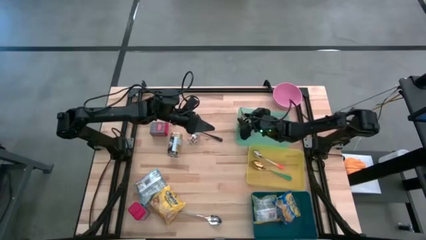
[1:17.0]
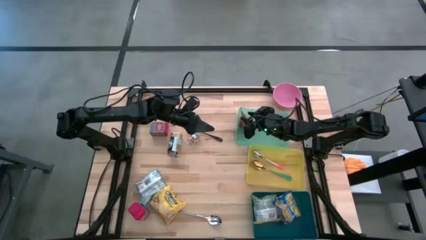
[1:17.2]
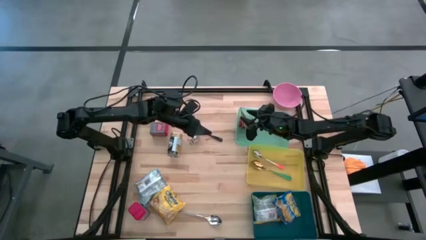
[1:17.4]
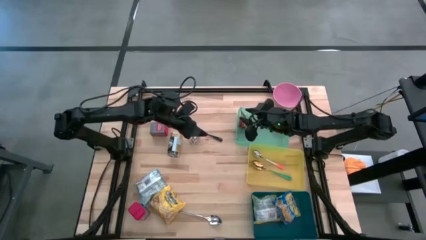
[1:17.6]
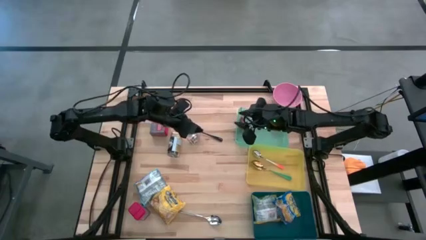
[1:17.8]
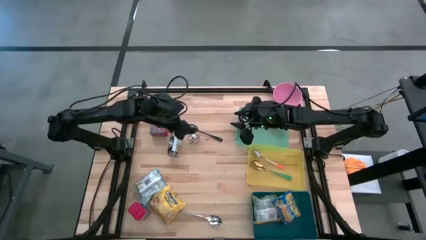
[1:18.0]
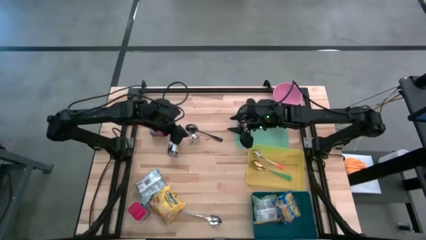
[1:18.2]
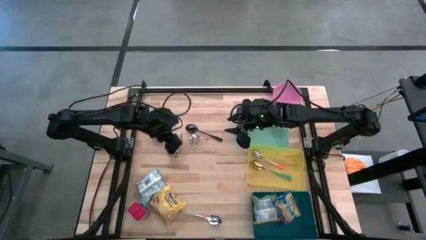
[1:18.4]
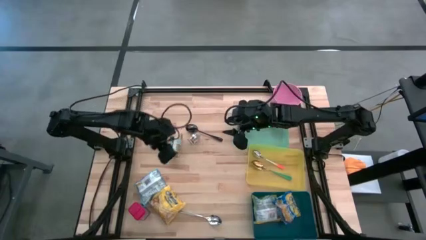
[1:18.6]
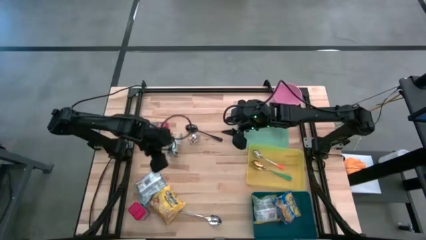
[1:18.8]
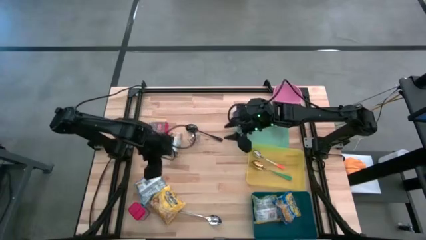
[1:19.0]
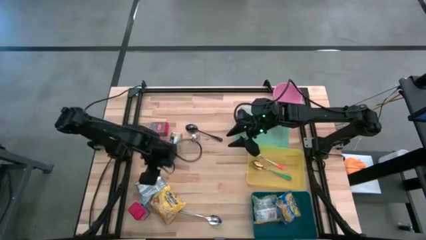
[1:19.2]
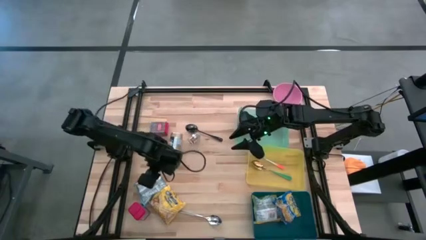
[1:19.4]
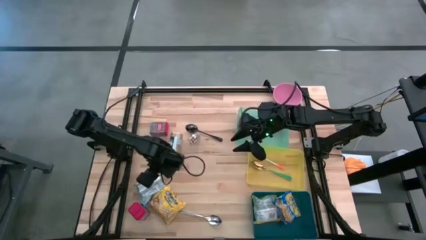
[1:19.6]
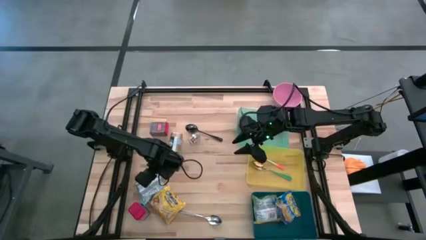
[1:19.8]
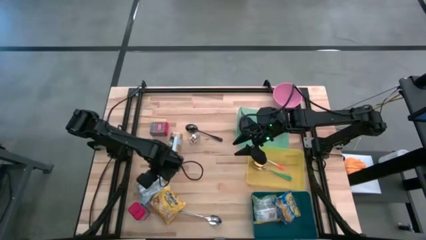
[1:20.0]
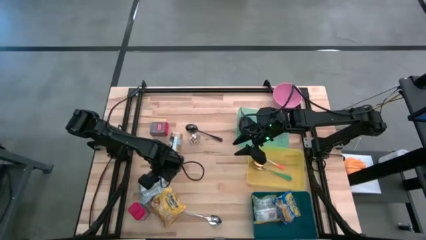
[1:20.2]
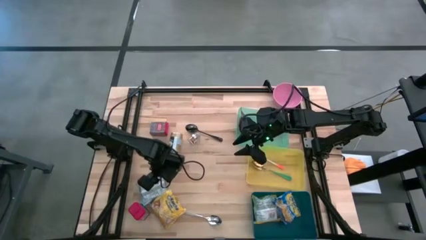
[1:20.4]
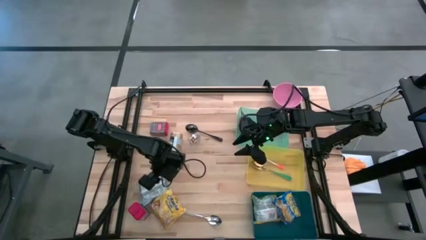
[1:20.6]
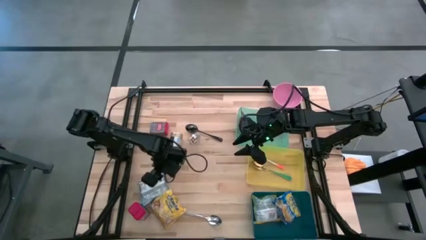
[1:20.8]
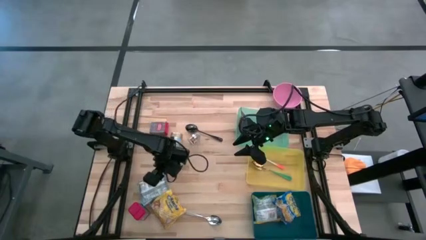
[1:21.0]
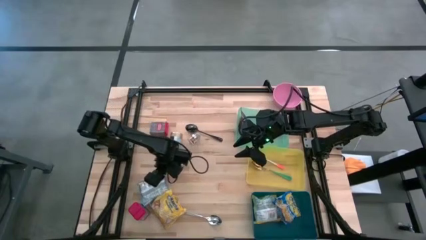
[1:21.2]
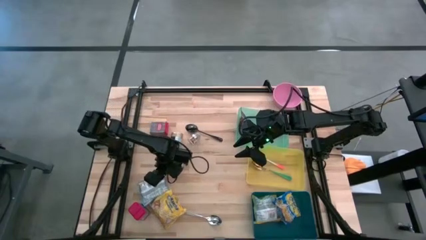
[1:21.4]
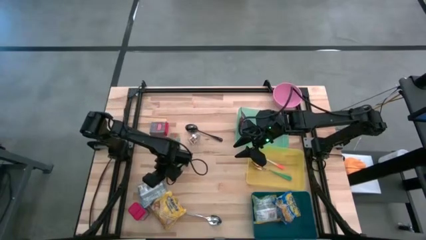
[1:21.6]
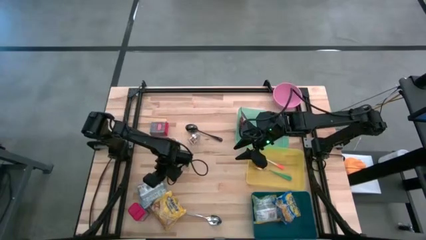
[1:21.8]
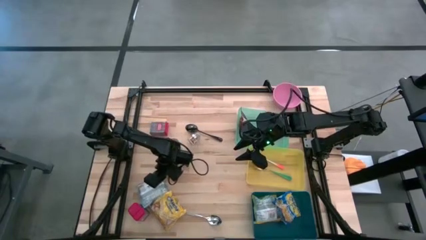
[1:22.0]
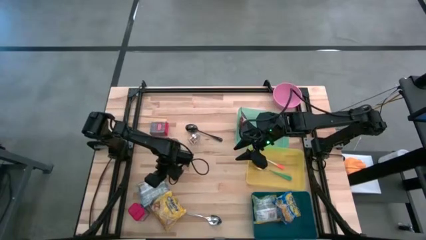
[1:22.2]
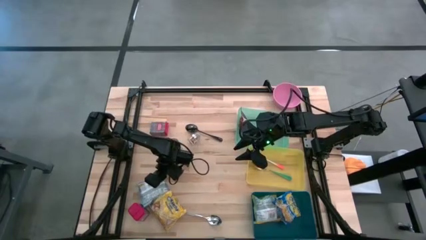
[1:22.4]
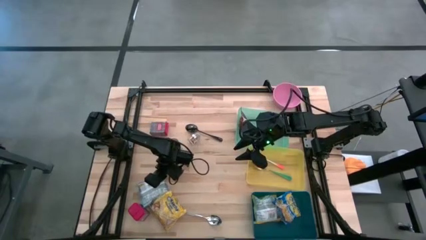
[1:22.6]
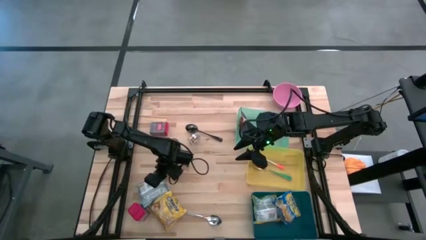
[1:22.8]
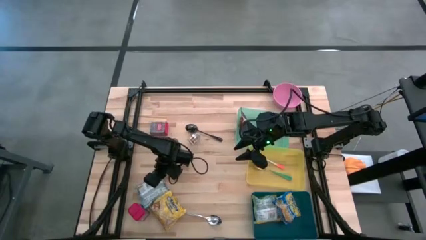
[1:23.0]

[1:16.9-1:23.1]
Put the light blue noodle pack into the blue bin

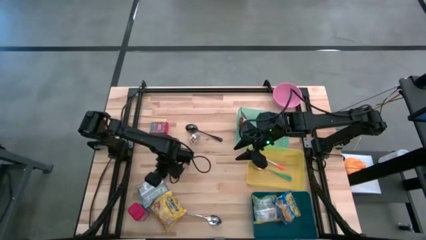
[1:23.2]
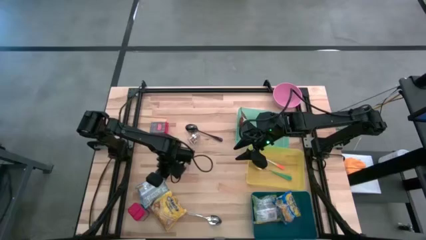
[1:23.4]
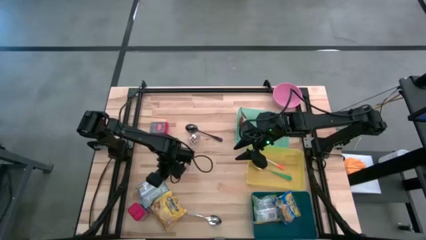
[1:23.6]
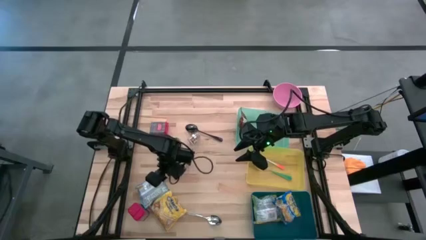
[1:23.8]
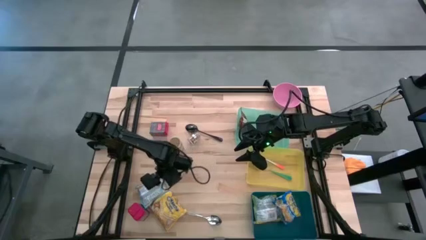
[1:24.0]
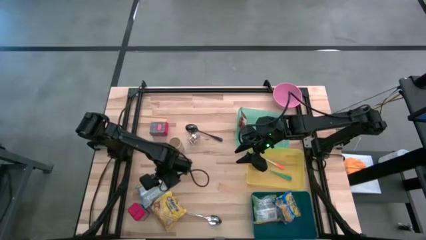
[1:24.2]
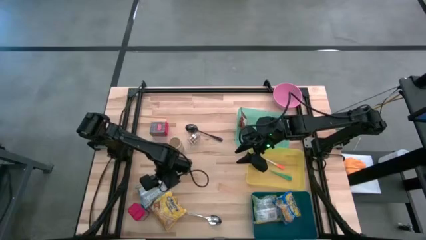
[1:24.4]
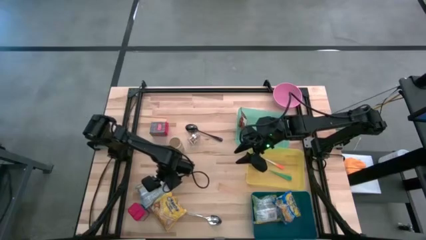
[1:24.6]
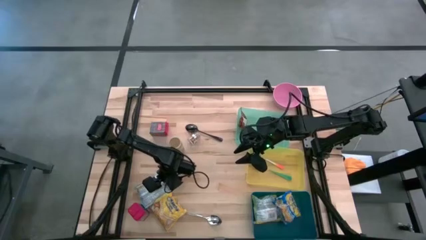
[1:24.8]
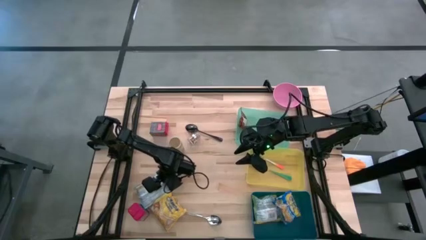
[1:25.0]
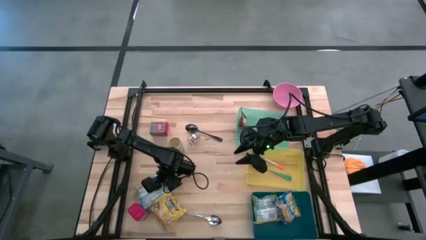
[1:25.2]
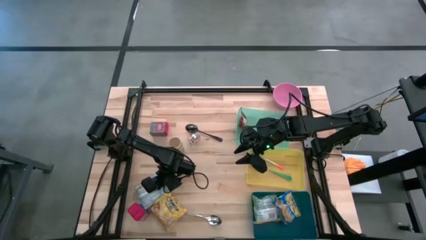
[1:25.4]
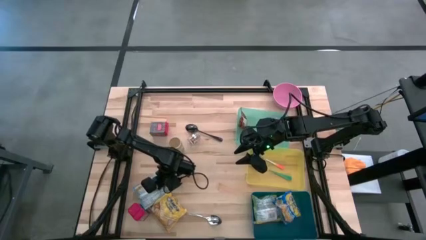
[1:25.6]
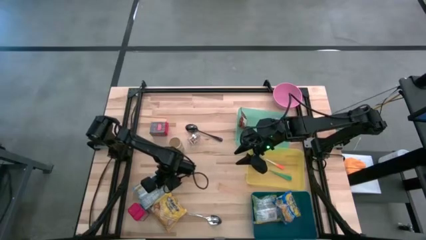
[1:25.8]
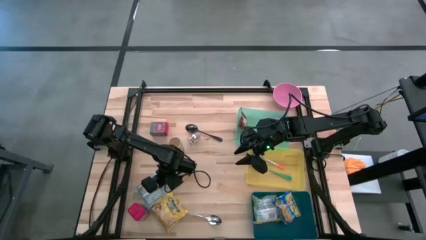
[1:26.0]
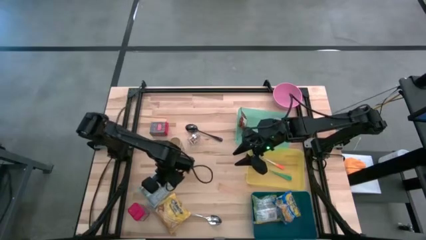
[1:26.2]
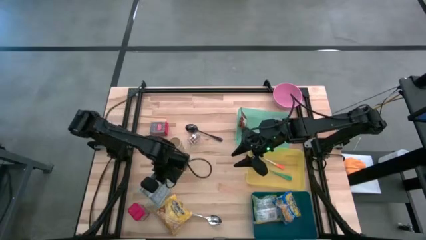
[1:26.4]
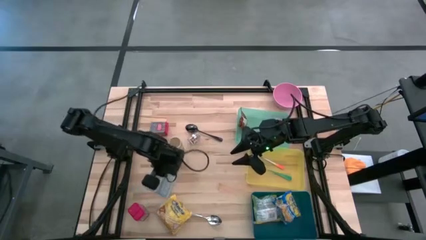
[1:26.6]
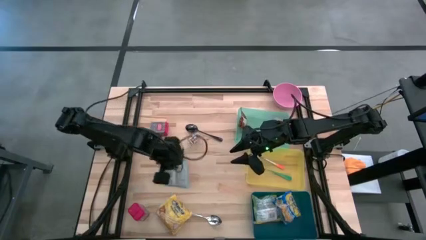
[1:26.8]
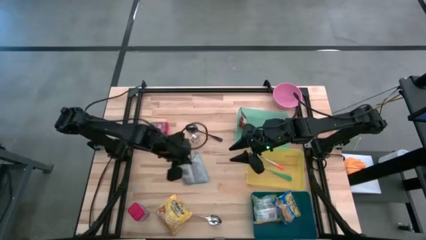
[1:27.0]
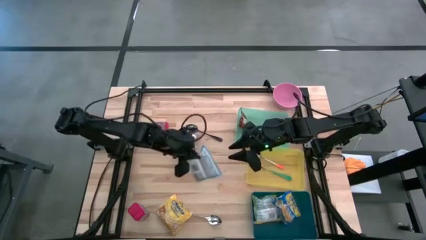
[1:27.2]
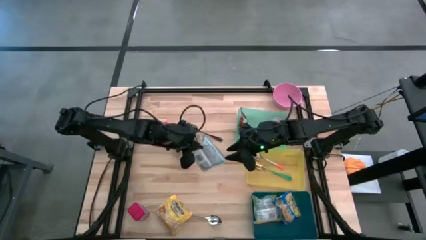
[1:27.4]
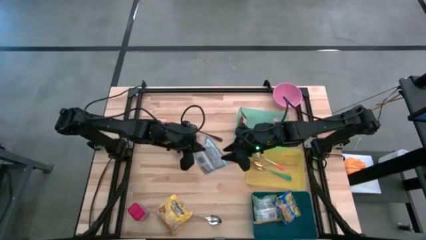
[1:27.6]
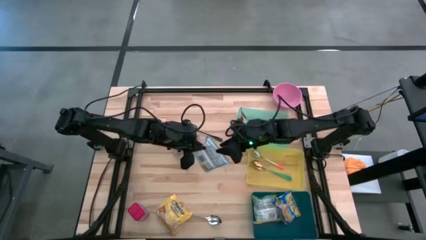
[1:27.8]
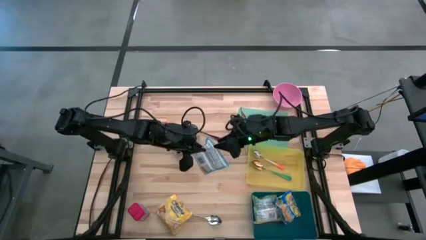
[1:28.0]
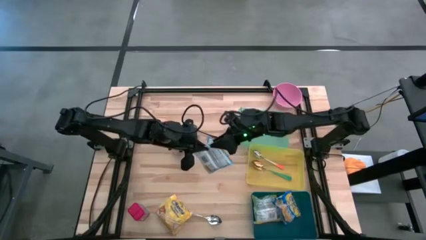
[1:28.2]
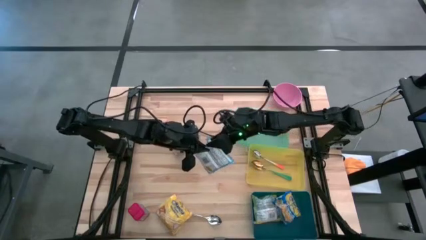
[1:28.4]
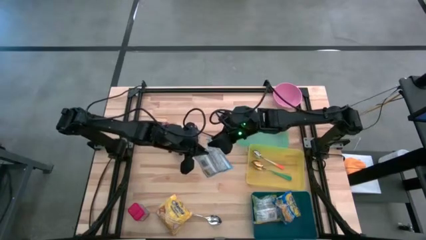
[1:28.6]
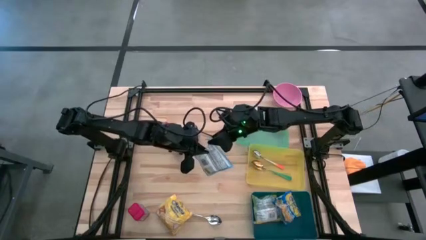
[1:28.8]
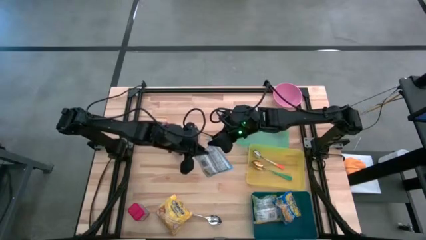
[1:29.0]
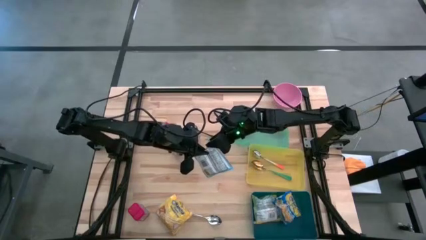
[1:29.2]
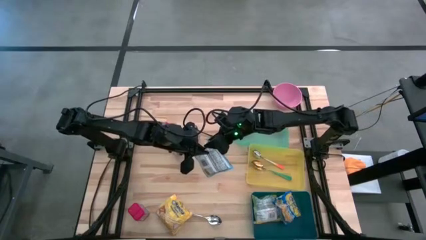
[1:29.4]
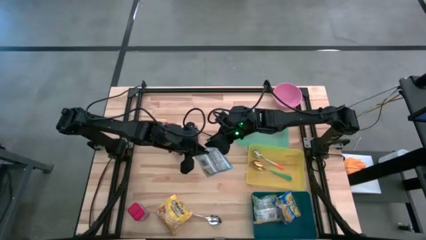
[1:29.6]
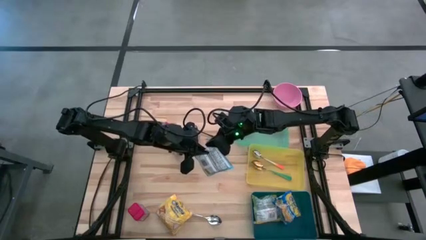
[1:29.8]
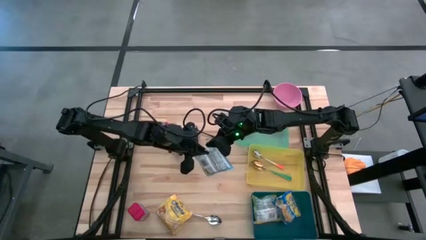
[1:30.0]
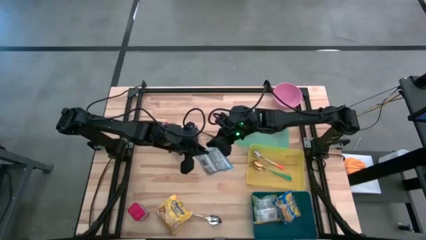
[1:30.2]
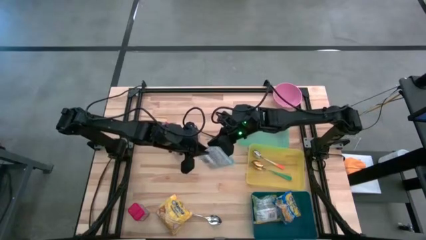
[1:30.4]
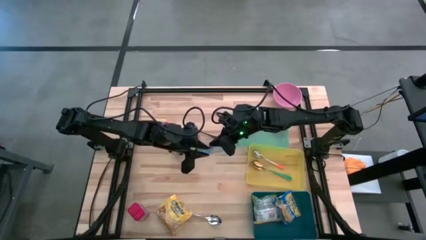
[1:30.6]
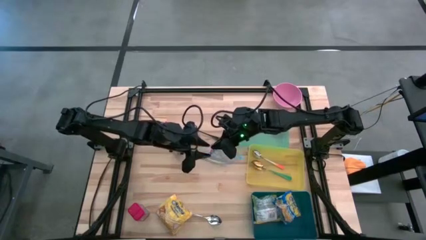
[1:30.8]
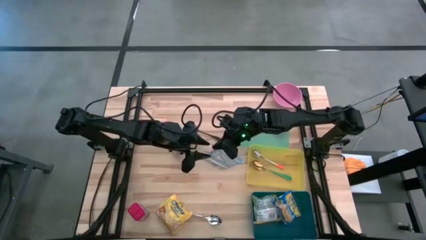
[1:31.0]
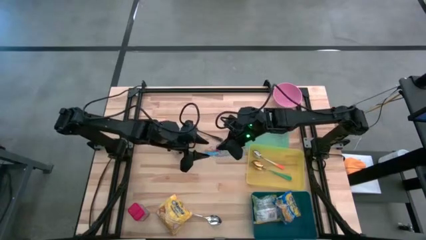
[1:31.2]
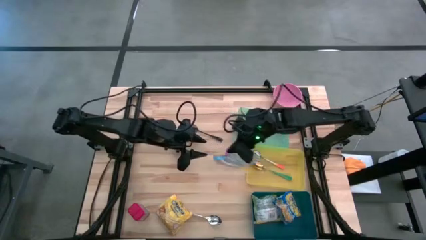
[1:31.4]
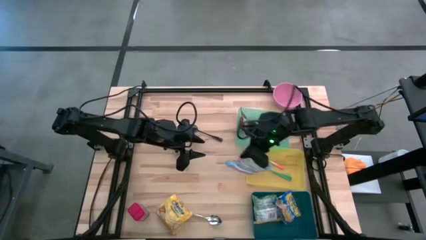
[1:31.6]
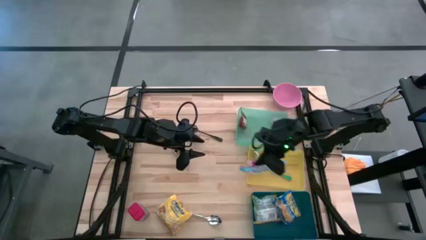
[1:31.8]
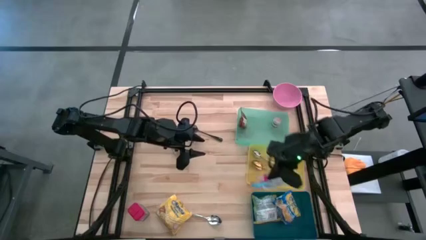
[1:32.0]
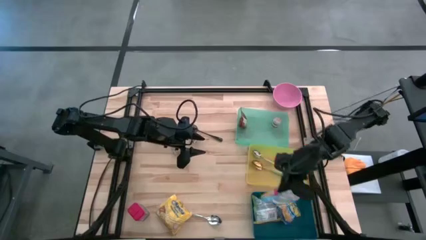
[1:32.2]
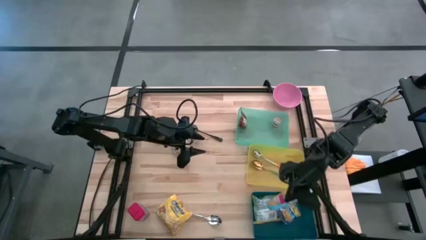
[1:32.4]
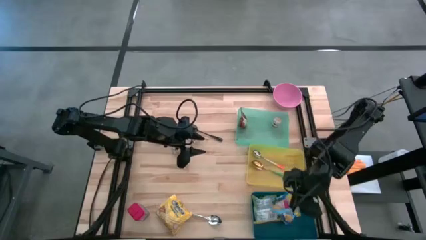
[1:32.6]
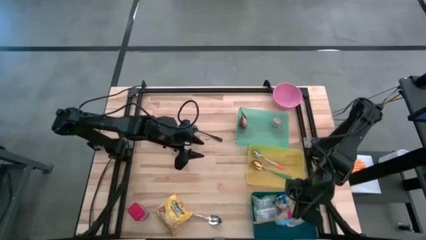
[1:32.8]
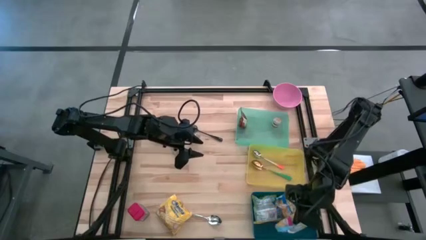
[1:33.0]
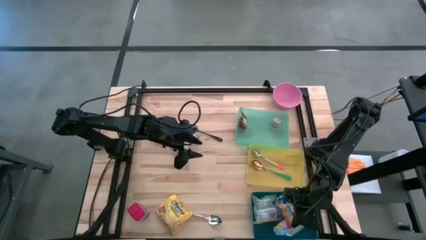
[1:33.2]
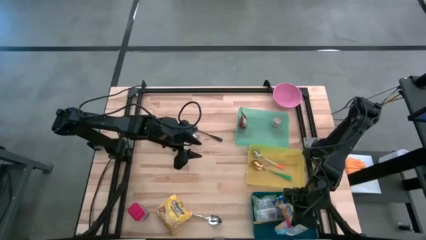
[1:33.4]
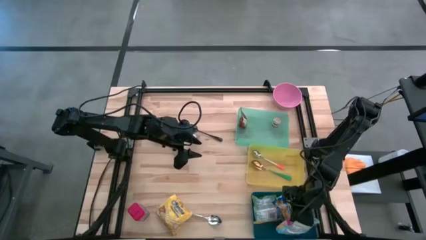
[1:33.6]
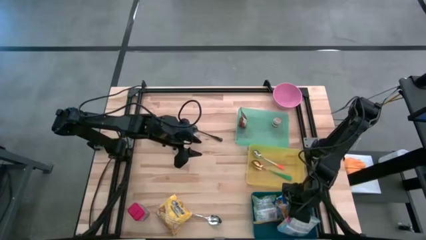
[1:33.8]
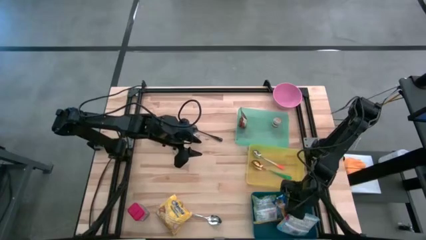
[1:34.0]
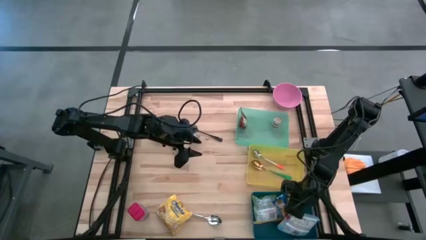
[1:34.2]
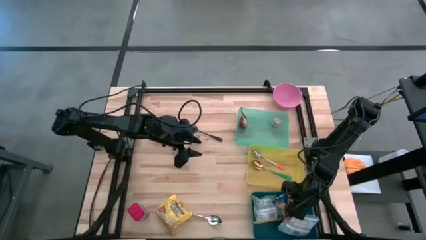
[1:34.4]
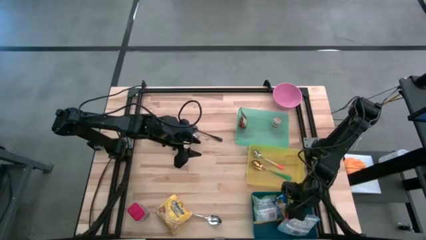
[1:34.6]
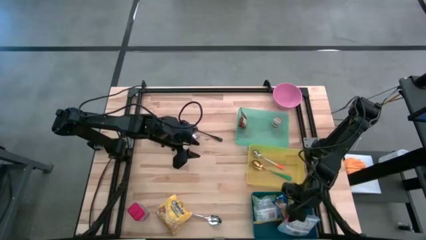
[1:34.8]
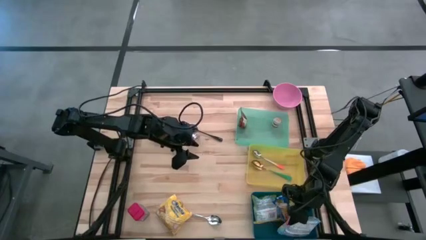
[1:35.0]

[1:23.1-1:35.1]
Put the light blue noodle pack into the blue bin
